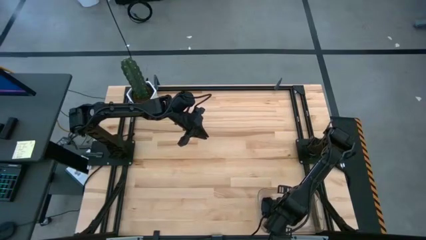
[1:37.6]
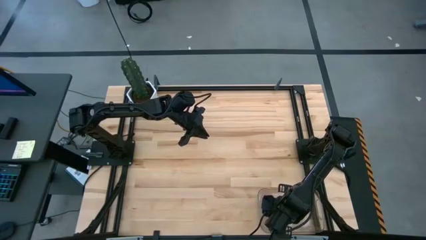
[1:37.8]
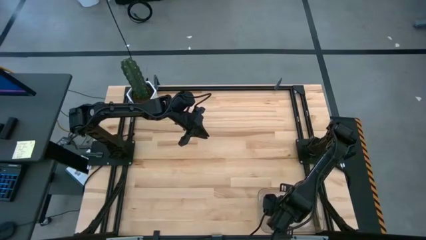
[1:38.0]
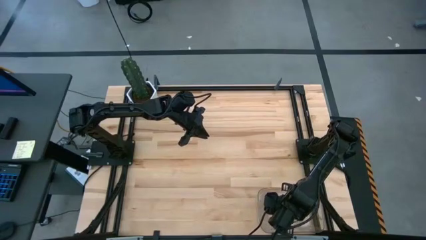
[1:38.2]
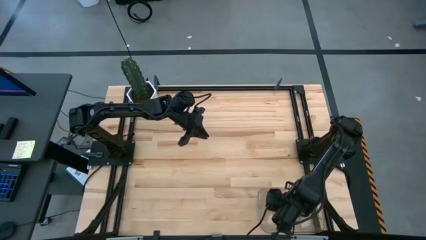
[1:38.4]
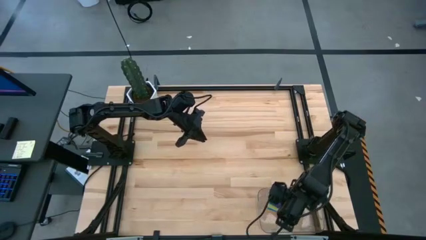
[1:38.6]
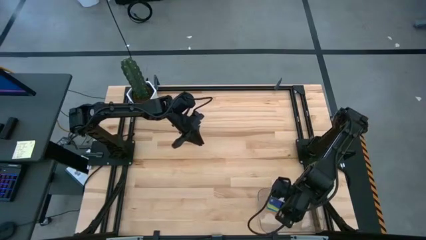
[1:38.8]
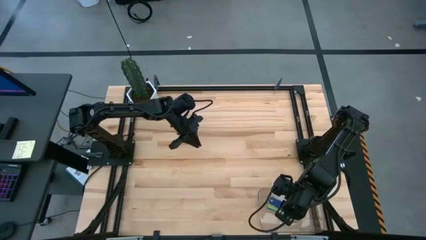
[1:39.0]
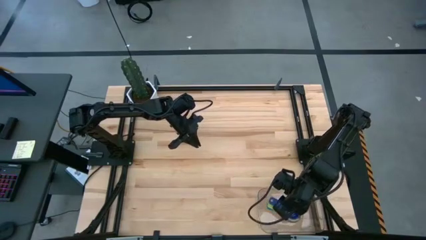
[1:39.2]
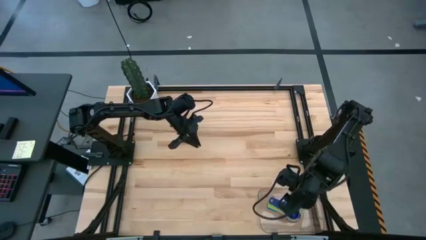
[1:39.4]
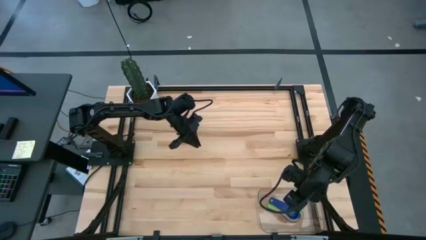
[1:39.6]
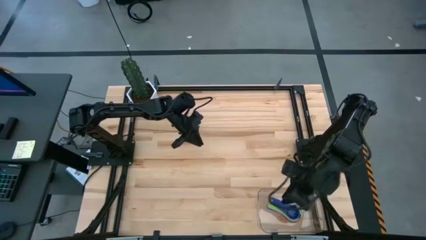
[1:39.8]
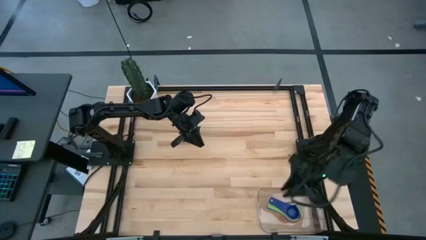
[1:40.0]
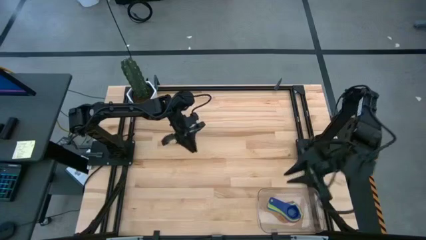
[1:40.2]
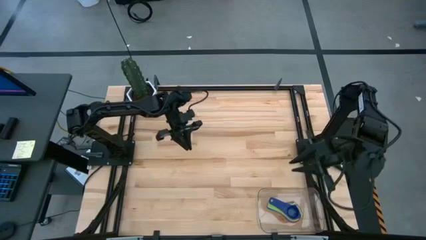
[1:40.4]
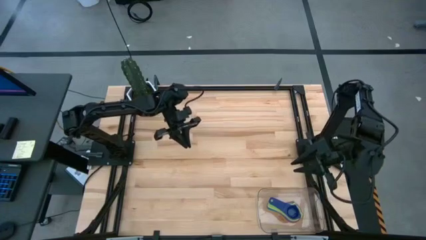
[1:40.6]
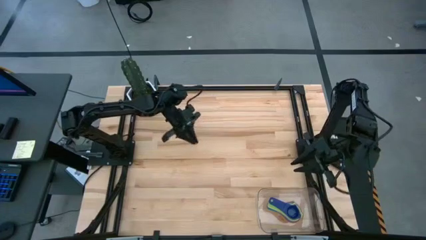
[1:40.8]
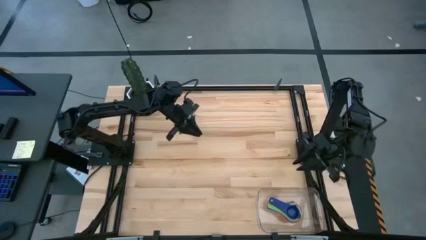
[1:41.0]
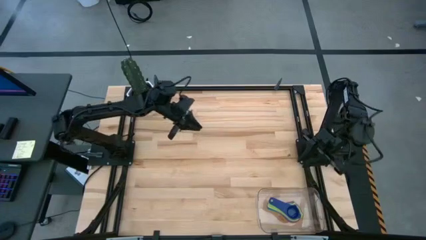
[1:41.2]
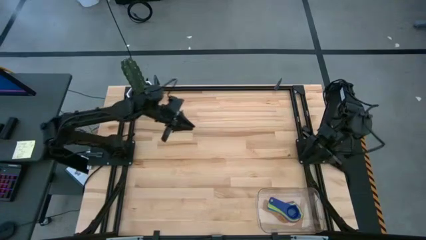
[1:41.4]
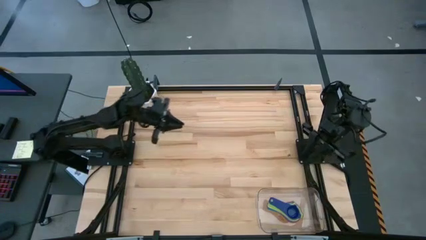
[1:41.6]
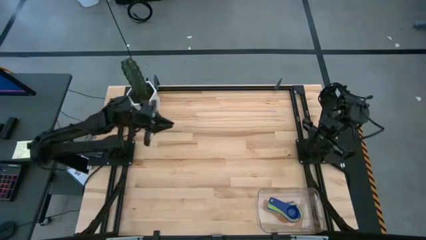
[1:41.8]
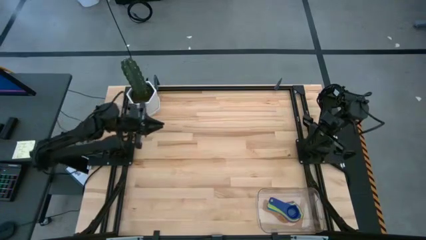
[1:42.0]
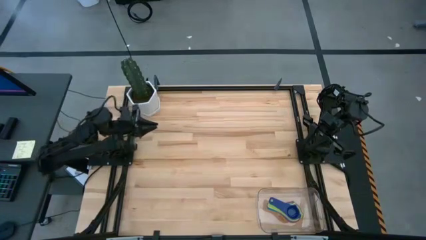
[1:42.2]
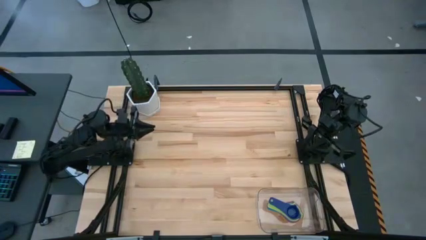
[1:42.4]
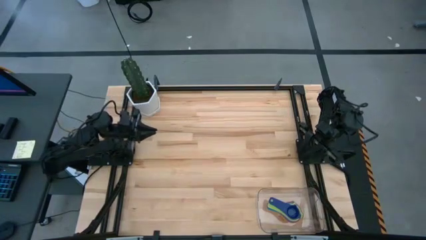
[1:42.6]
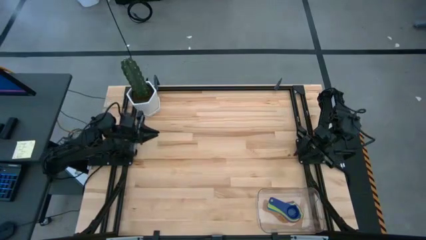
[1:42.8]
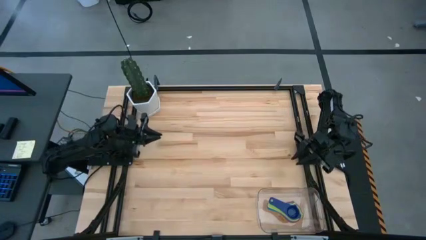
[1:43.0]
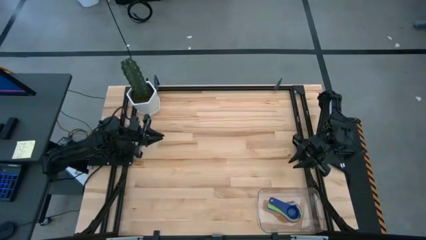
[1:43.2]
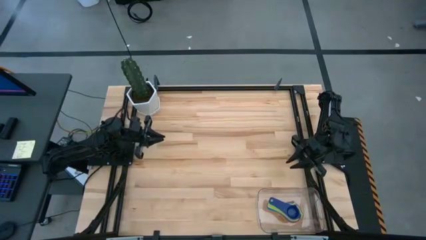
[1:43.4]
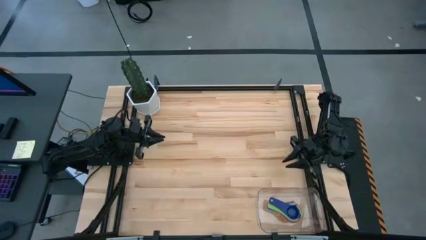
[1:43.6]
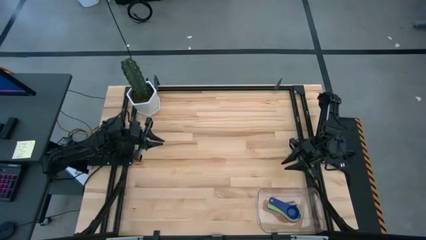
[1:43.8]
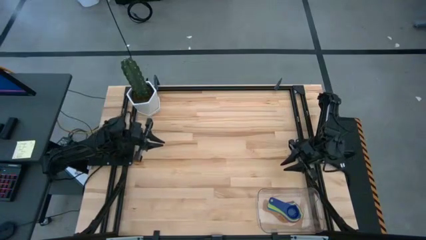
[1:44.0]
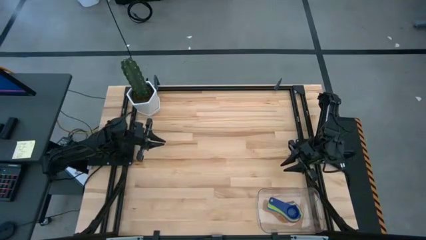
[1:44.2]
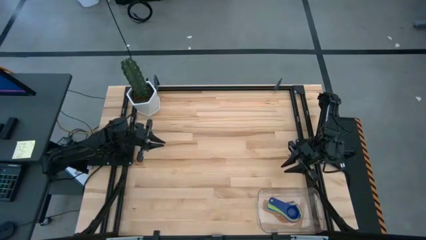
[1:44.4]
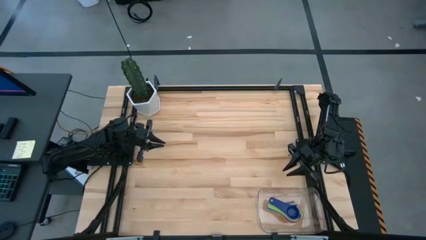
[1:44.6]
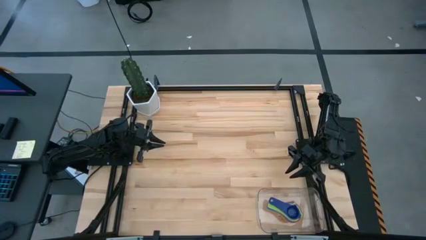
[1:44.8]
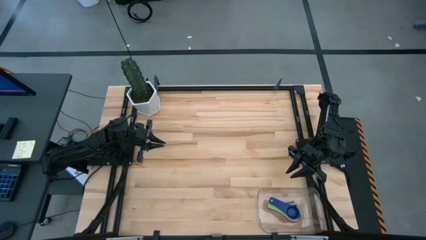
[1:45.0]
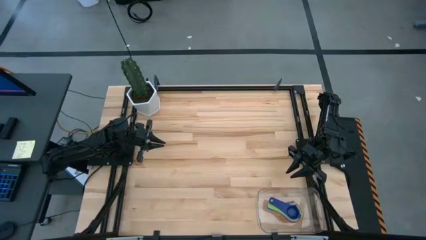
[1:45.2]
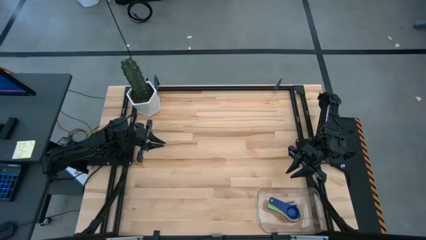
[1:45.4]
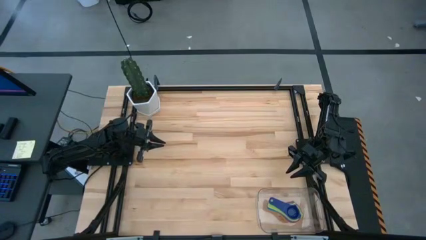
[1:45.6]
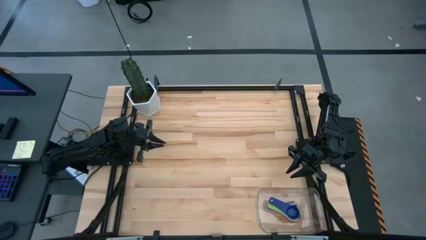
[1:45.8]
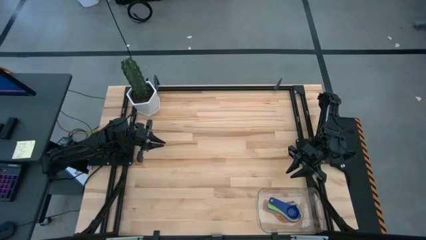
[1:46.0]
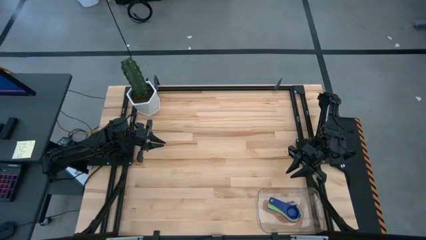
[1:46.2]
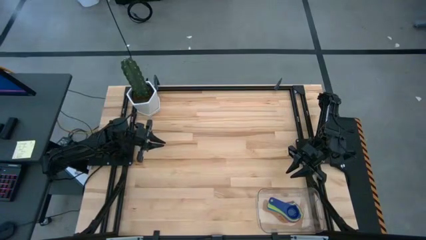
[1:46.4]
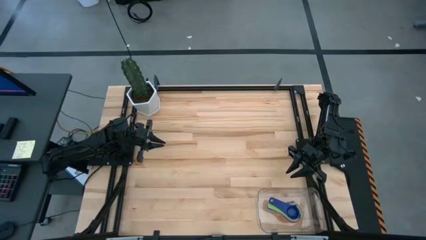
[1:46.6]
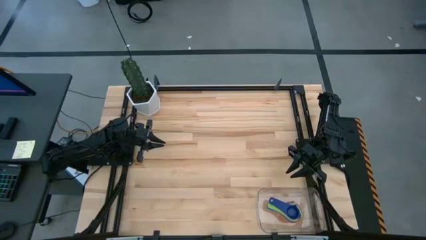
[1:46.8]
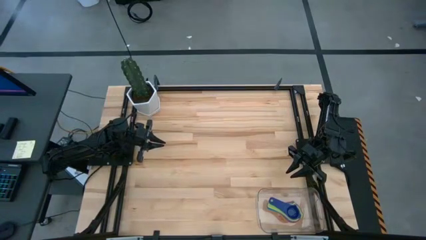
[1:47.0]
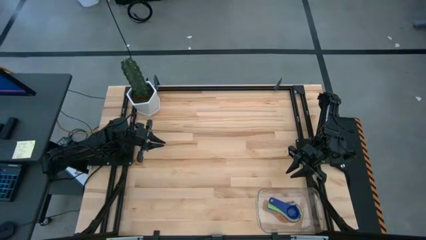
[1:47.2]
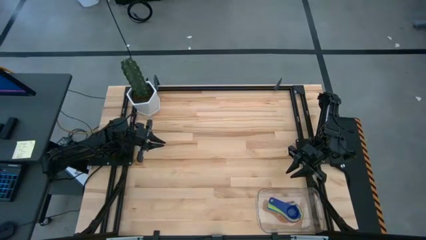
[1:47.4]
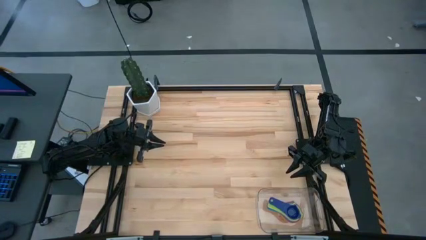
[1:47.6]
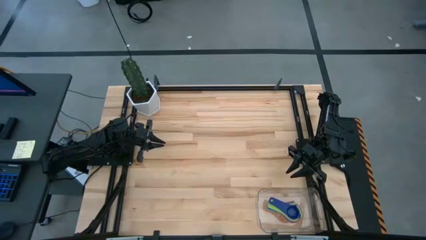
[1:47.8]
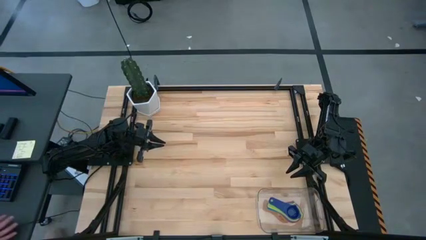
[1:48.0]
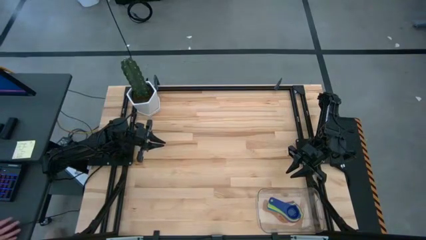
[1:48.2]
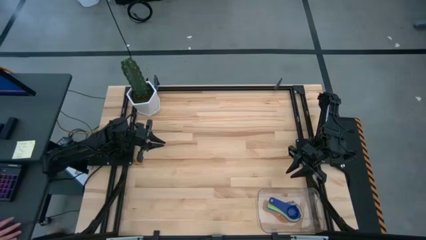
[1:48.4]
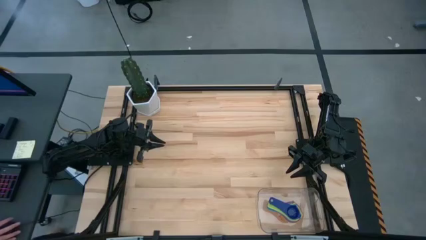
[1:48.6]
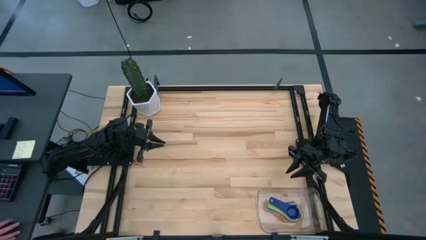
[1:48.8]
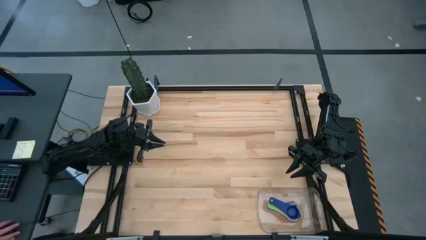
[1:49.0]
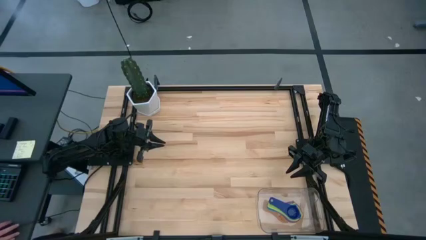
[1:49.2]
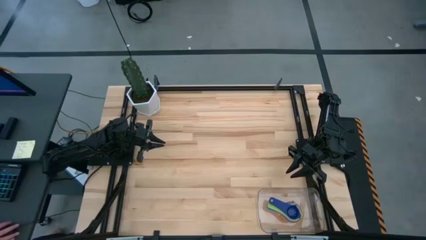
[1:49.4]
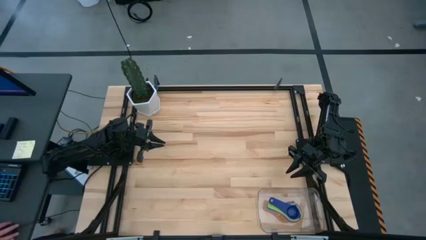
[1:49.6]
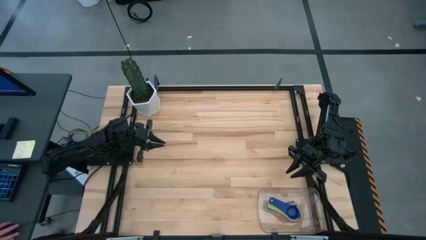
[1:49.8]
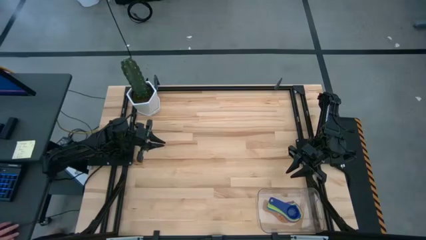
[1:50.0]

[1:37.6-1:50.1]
Task: Nest measuring cups in basket
Return to Home Position

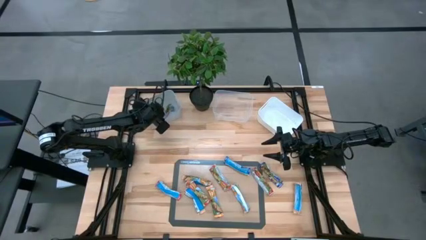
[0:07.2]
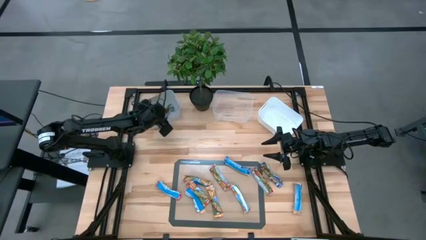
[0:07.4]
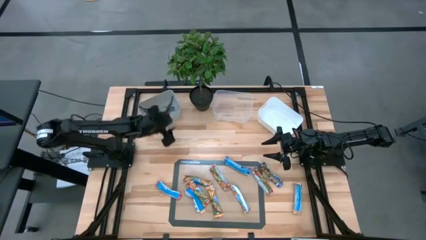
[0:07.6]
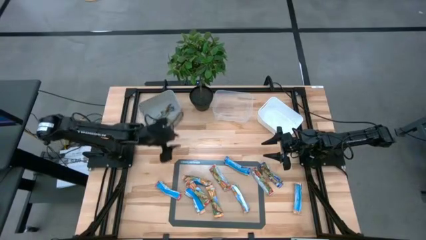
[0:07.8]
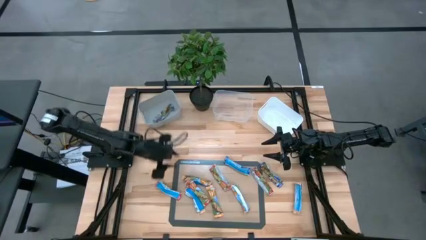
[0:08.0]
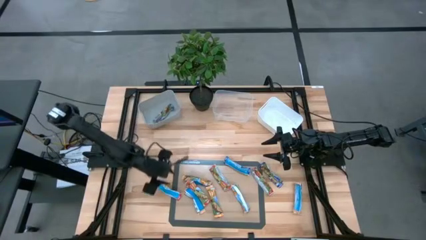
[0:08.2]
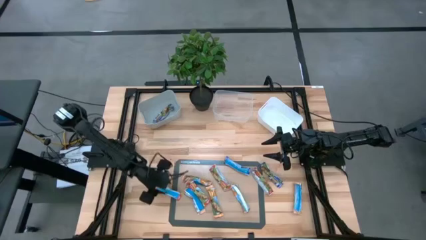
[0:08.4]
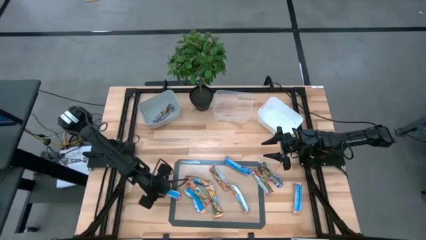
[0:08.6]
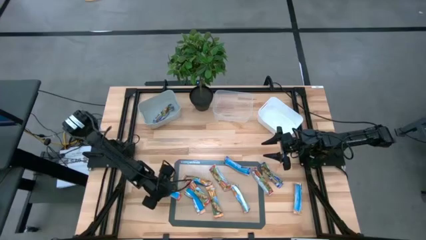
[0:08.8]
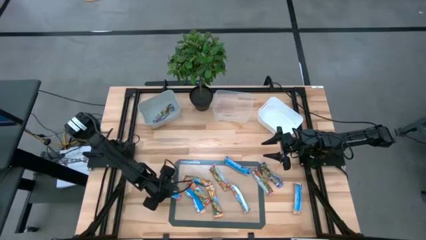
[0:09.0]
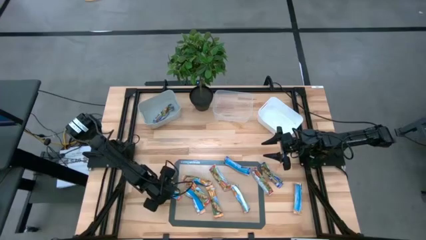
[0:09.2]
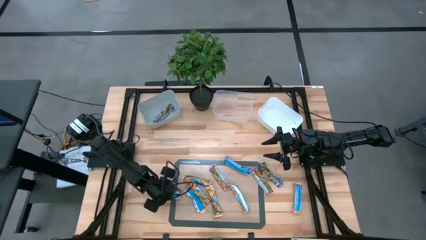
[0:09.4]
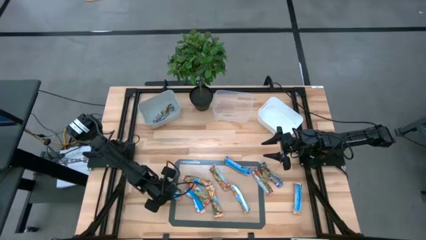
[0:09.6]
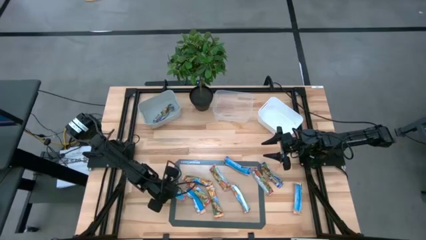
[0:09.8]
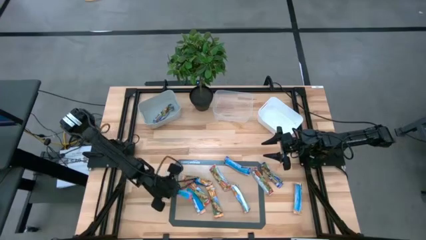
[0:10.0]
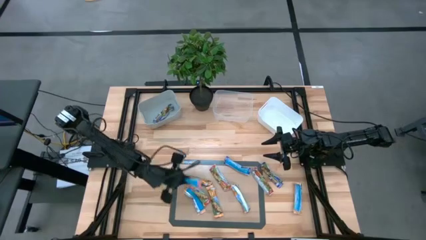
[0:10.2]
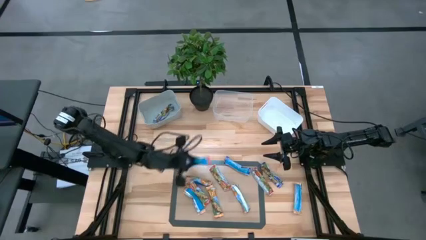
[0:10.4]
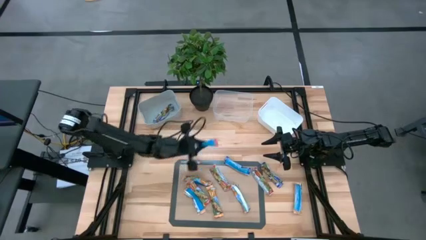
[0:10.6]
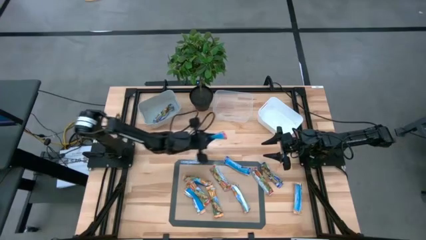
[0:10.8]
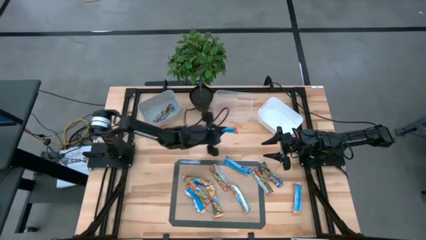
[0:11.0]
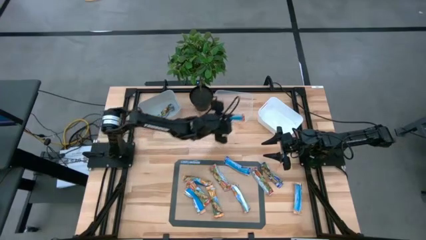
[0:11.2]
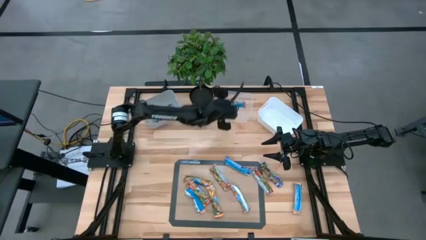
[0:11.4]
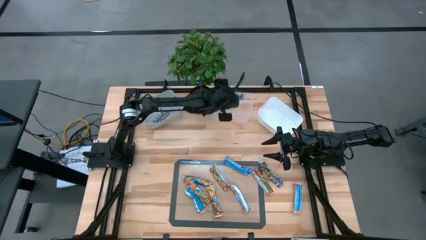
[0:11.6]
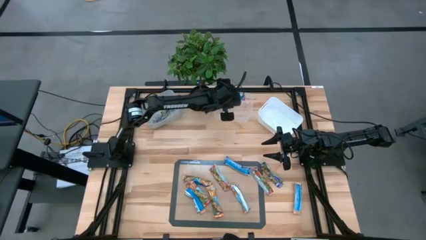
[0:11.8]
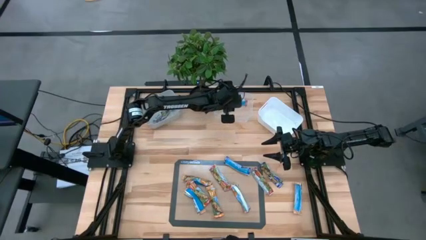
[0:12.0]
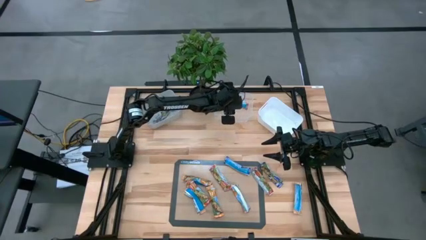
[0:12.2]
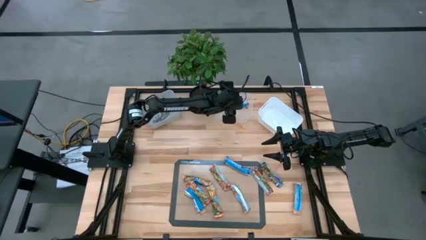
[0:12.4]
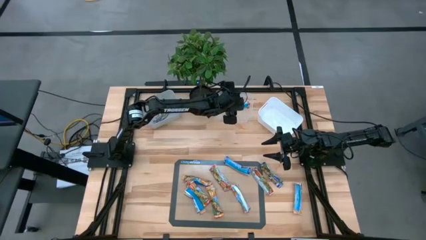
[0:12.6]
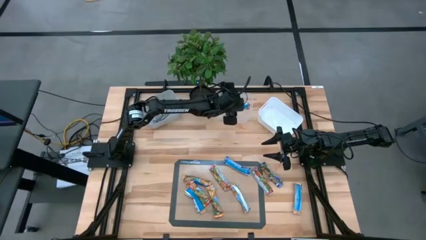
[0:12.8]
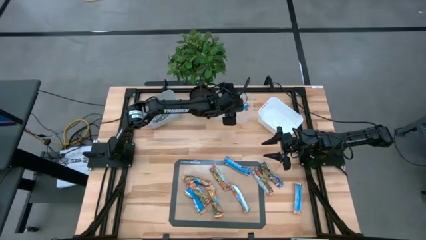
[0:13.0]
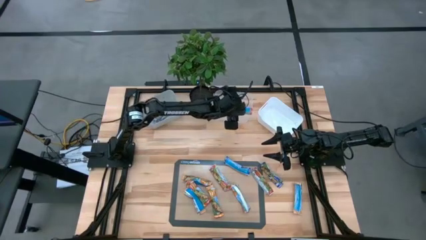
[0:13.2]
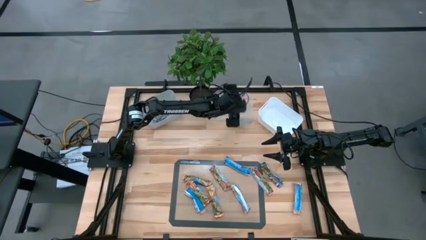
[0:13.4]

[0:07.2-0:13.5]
Task: Pick and place Granola Bars by type
Put the red granola bar into the transparent bin
